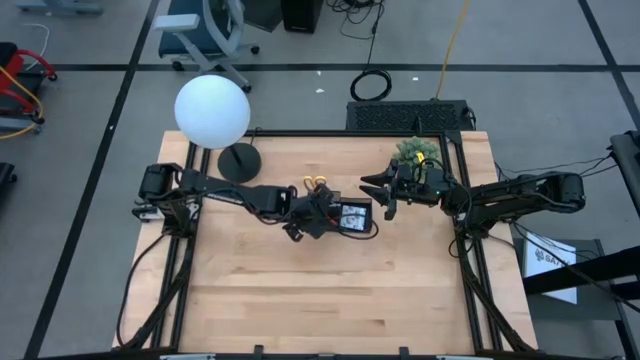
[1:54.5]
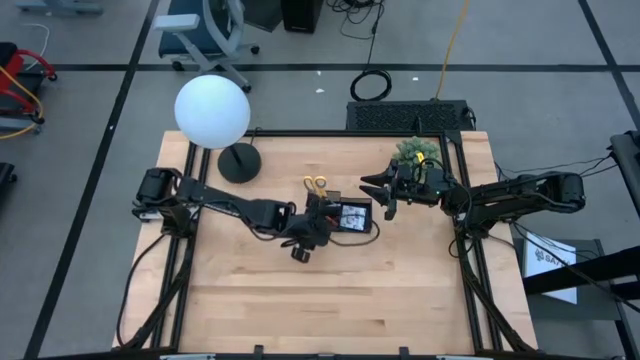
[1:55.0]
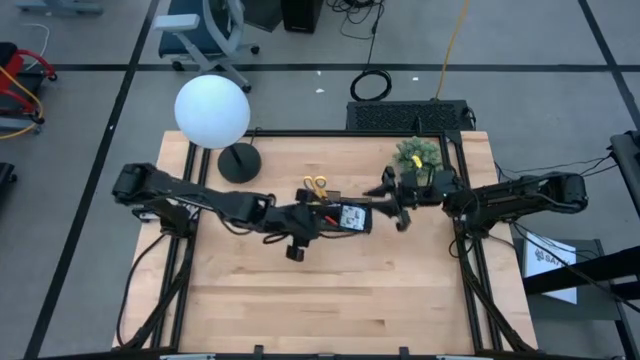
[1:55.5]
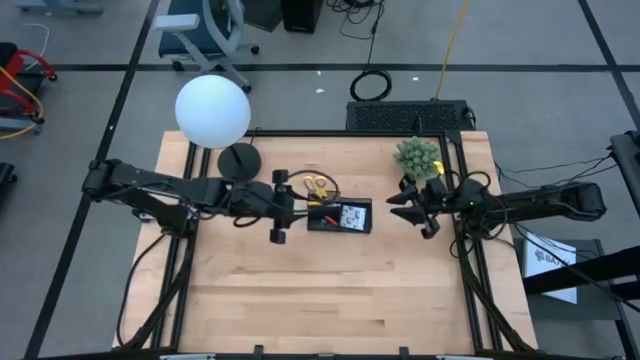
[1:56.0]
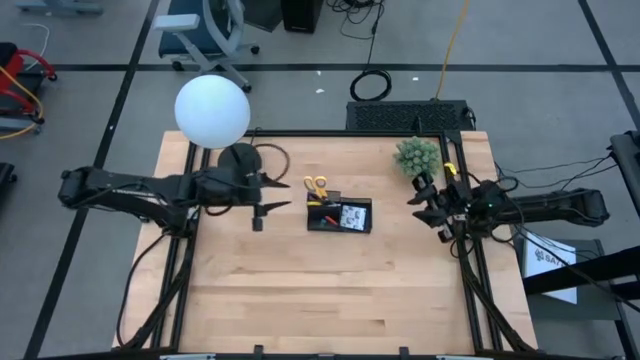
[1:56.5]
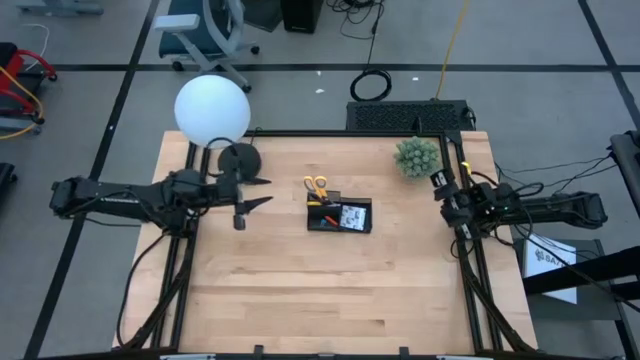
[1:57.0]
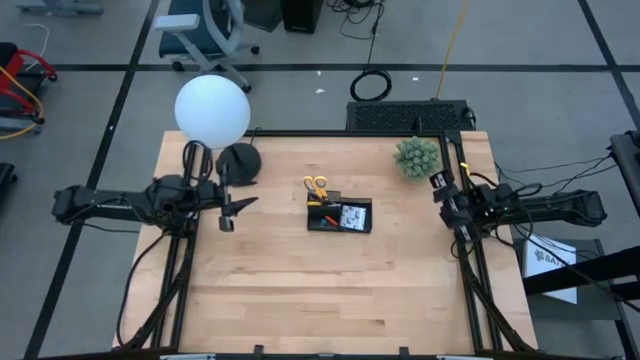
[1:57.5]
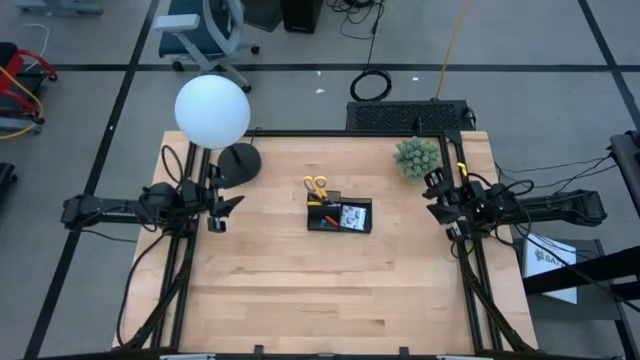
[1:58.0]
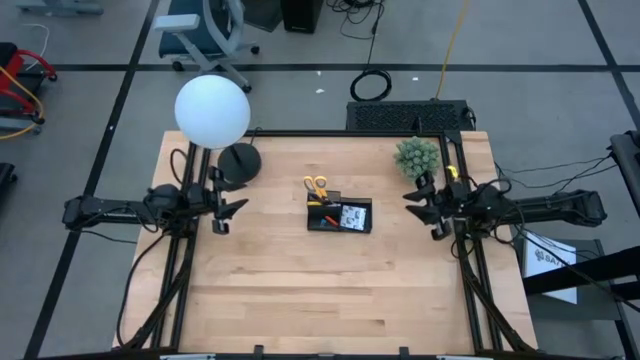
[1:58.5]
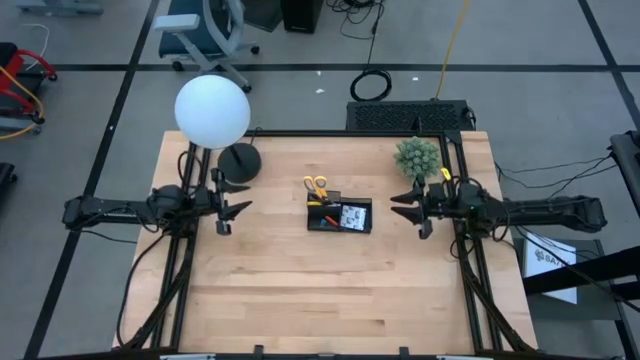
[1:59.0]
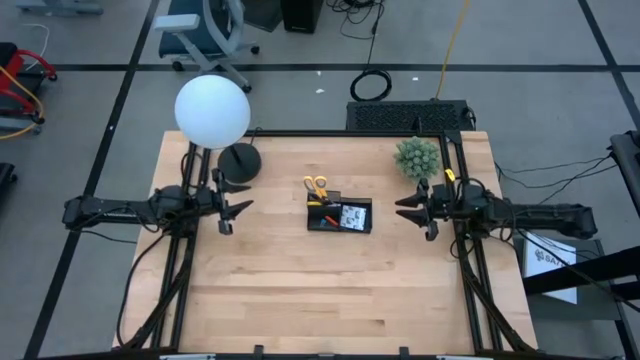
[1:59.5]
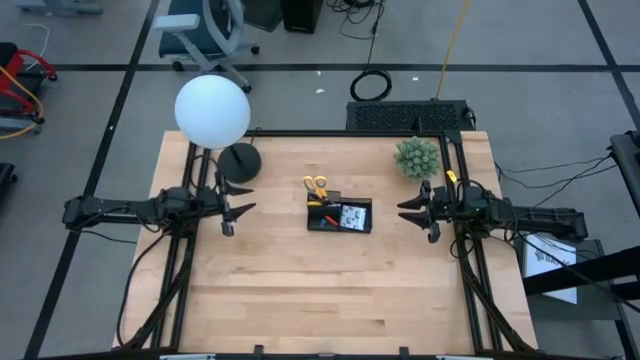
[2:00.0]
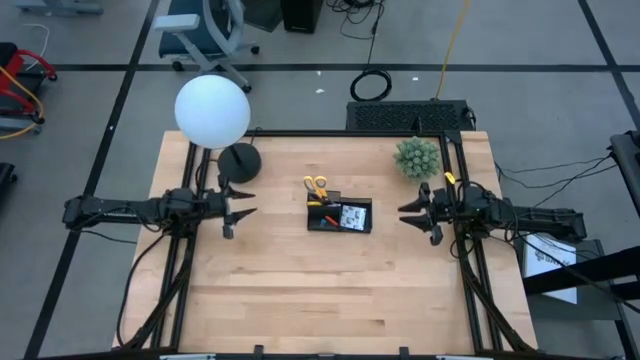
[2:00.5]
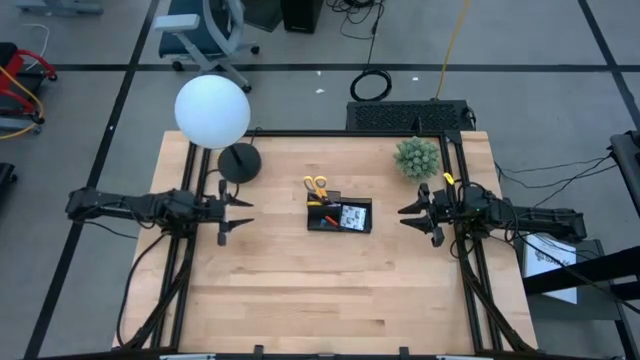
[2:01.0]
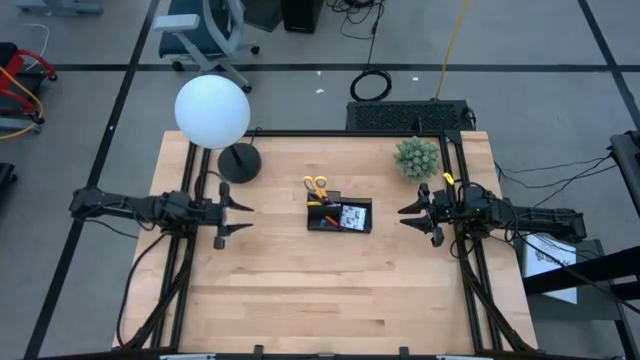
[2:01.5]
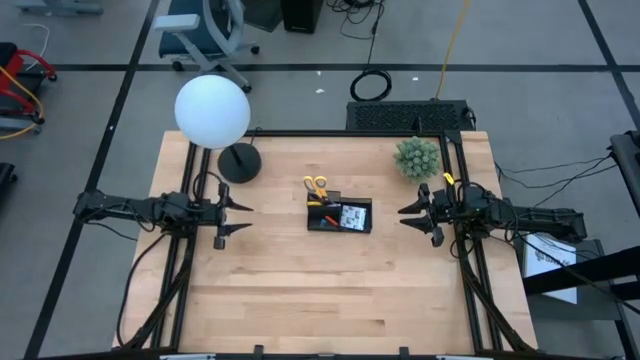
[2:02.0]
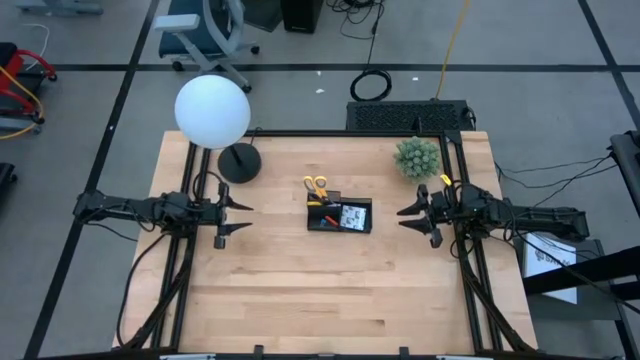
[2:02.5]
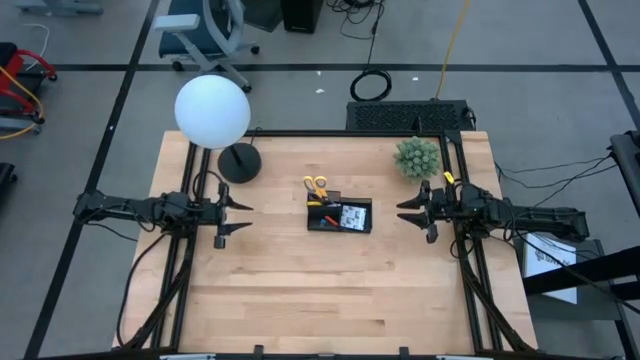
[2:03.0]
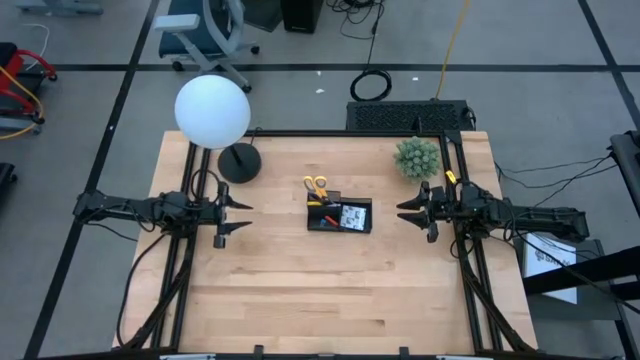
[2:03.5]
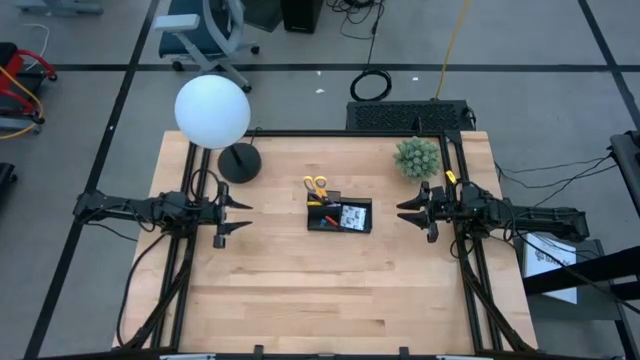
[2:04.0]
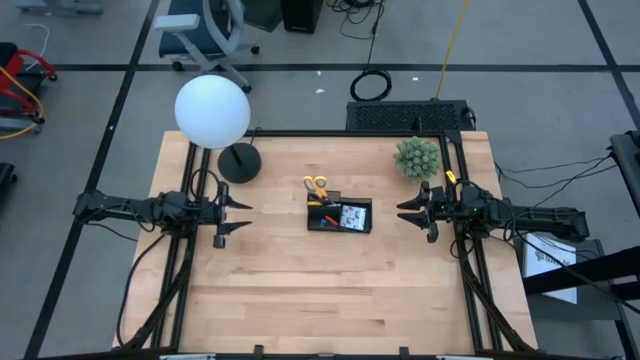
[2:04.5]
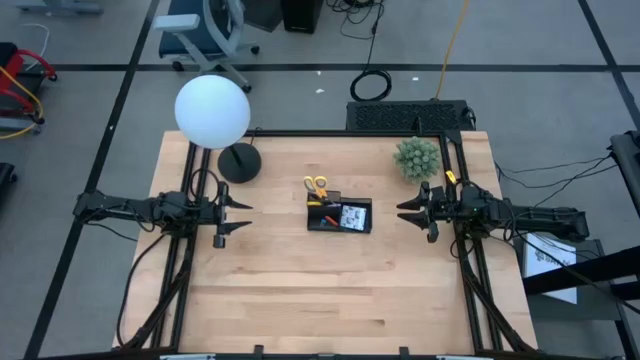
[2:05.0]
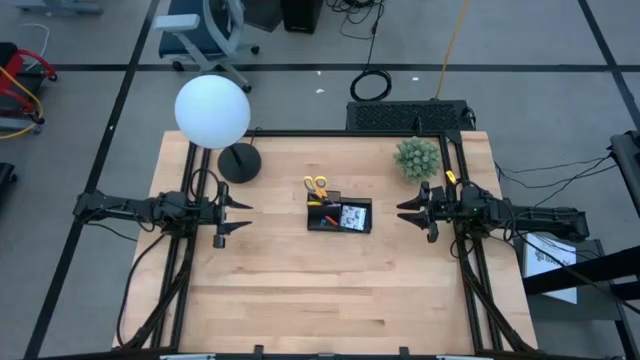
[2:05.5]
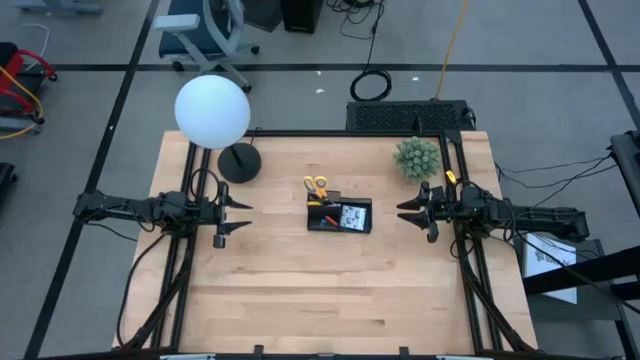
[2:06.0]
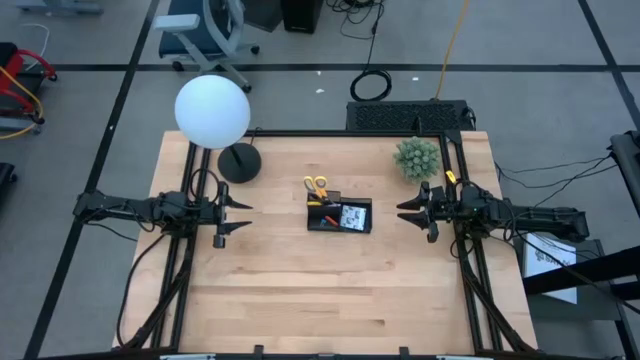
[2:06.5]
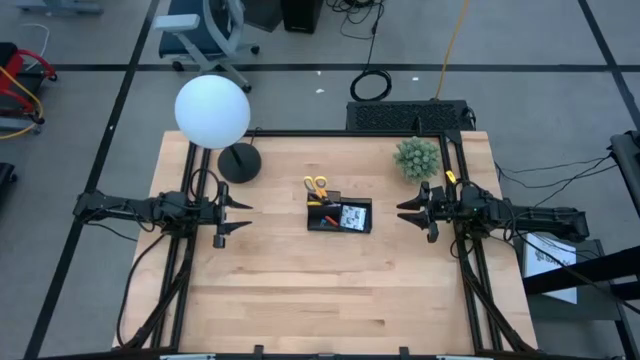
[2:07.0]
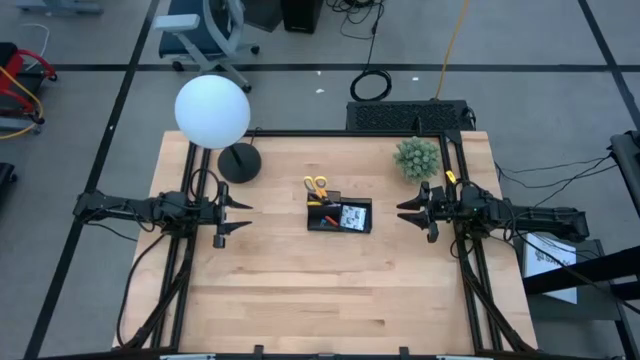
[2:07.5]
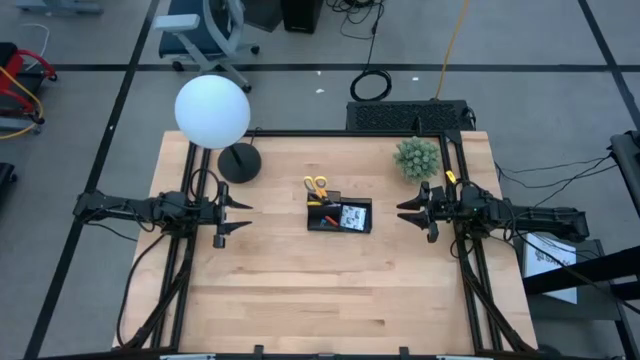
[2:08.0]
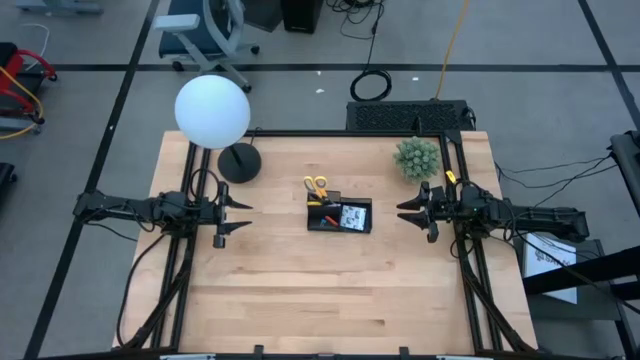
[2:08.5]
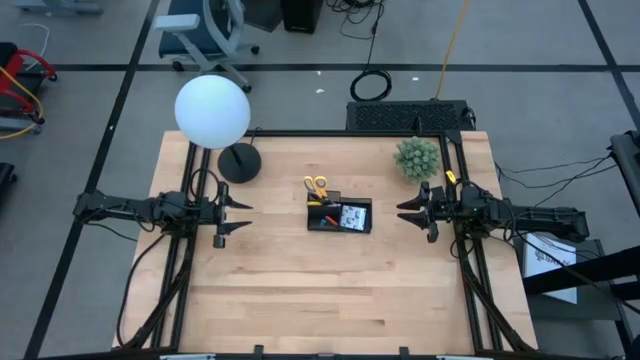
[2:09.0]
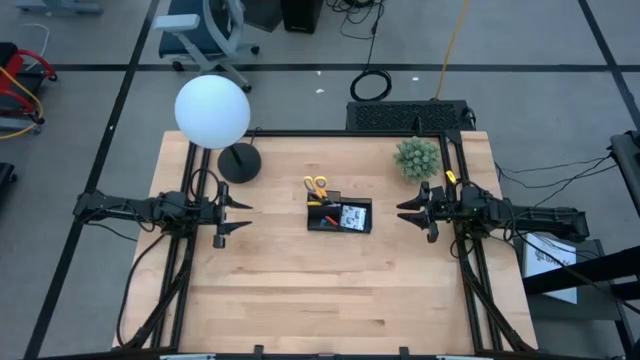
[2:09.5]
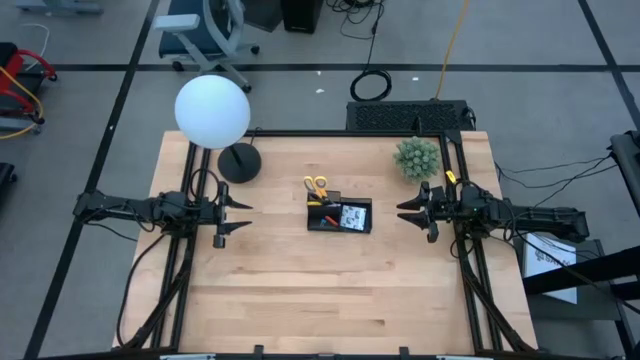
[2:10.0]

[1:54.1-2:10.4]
Task: Pick and place office supplies into organizer
Return to Home Position

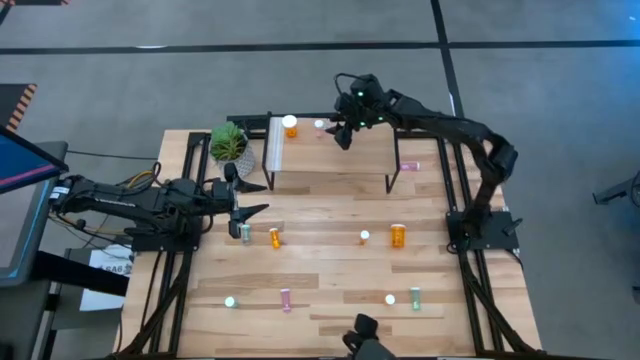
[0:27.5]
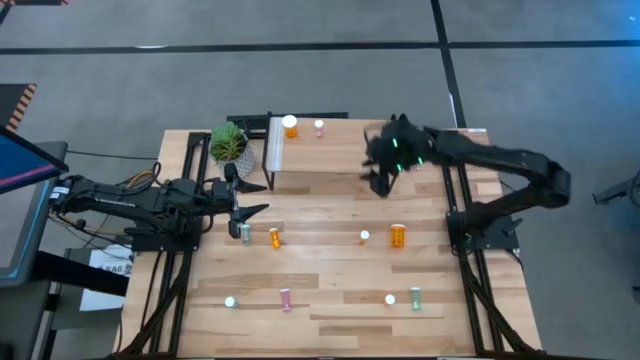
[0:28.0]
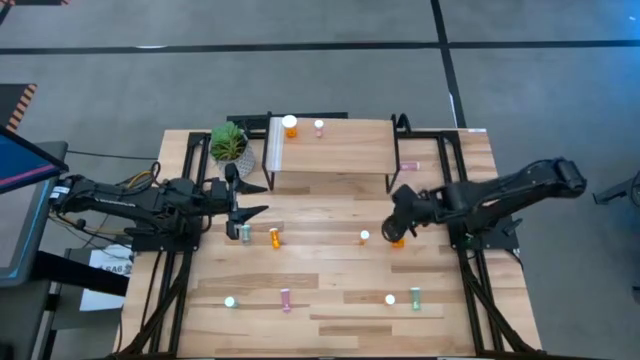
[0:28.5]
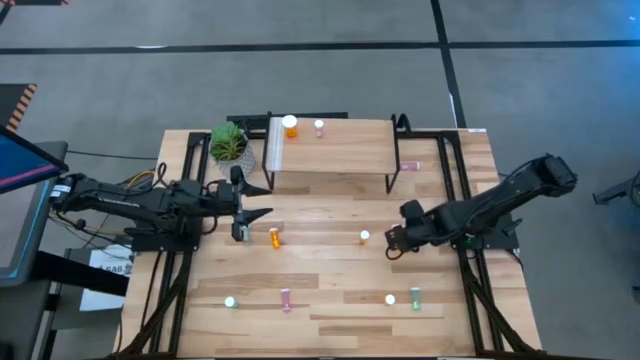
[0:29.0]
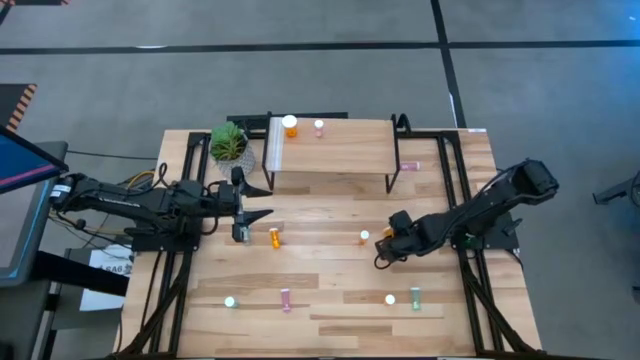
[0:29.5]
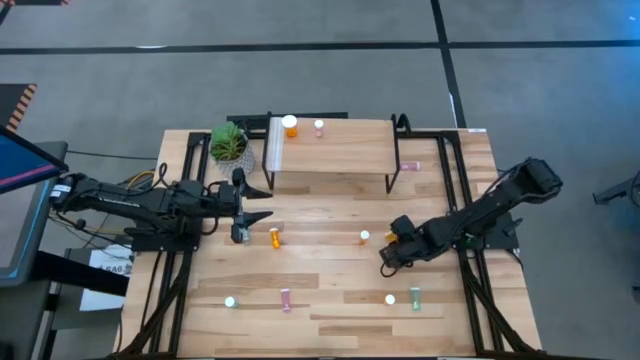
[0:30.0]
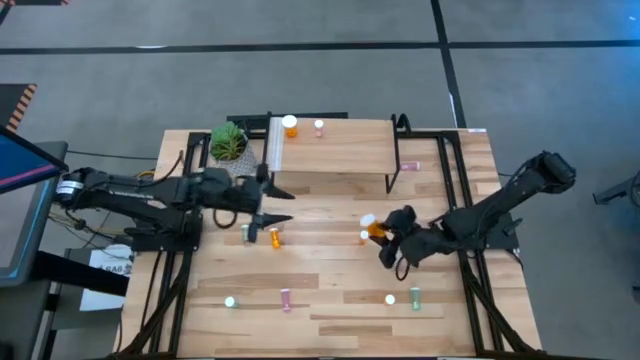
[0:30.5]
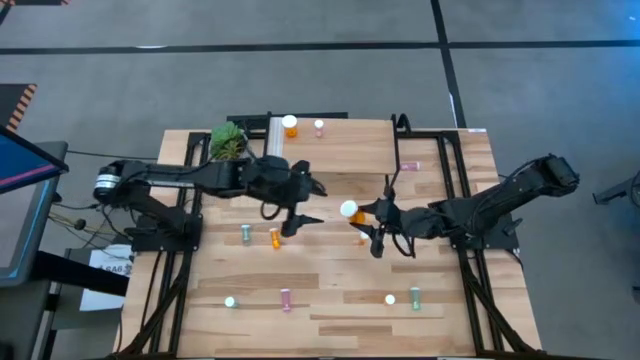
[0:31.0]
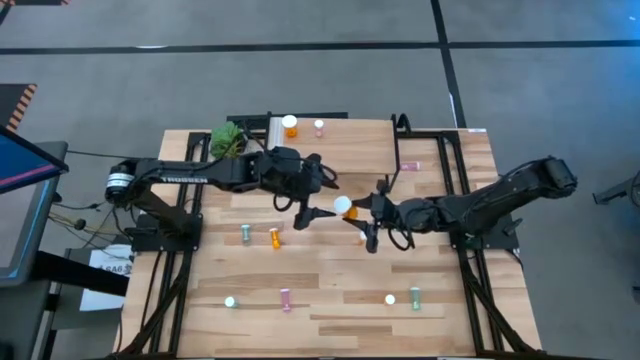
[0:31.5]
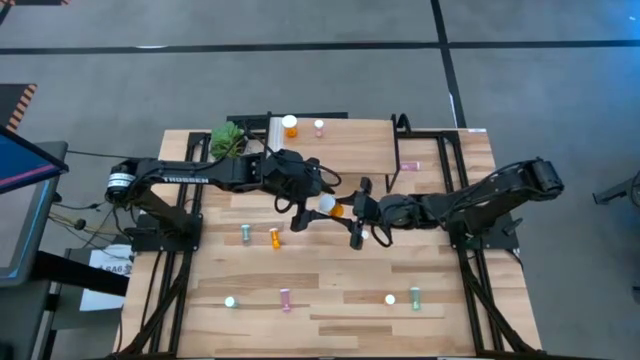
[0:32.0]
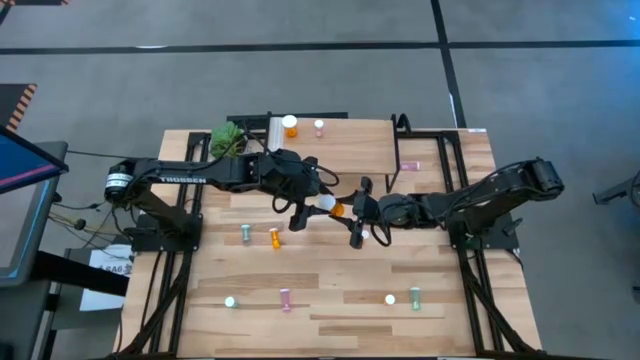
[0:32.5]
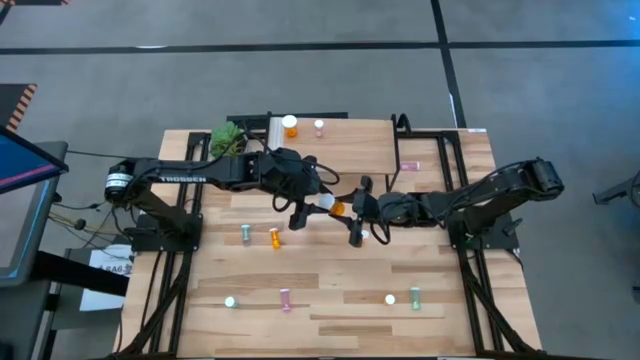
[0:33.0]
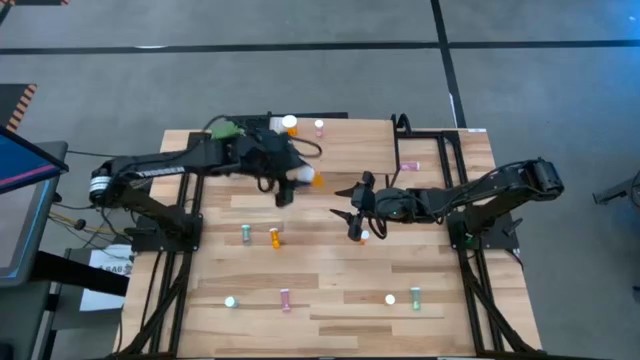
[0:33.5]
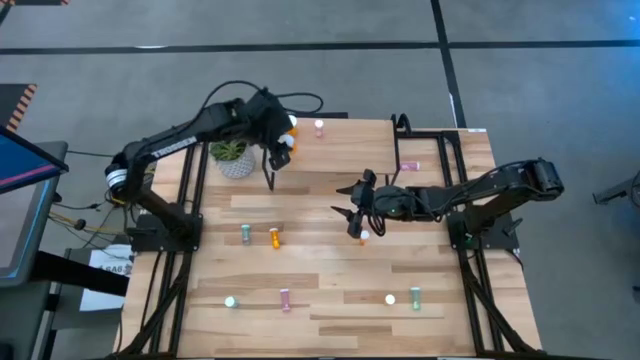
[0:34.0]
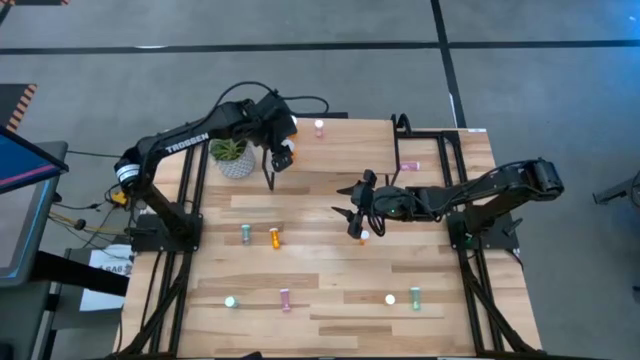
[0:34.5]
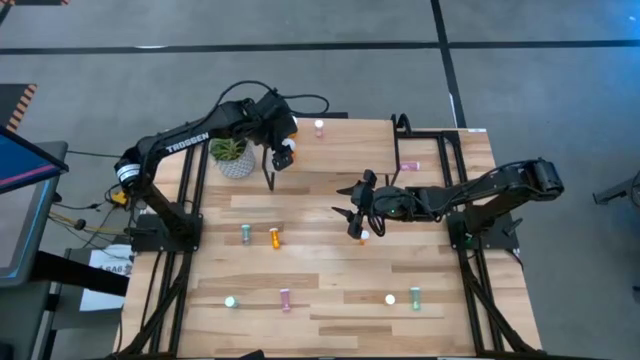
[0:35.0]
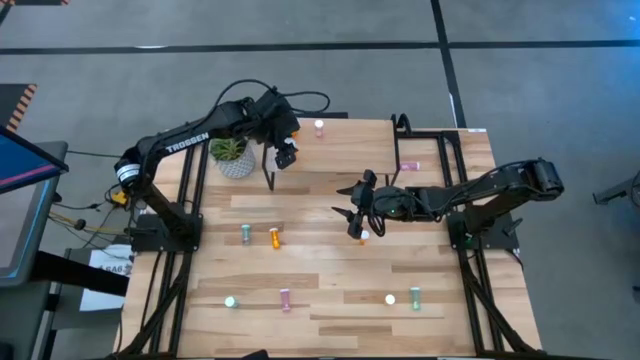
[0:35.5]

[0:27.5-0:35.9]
Task: Pick and place medicine bottles onto shelf by color
Put the big orange pill bottle aligned with the other big orange pill bottle on the shelf
